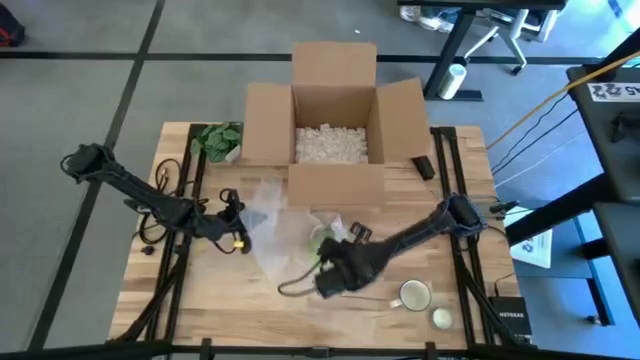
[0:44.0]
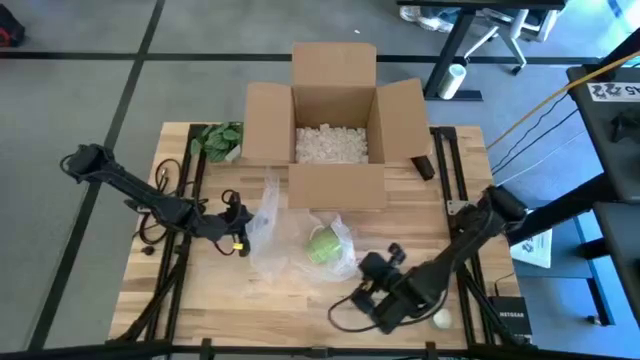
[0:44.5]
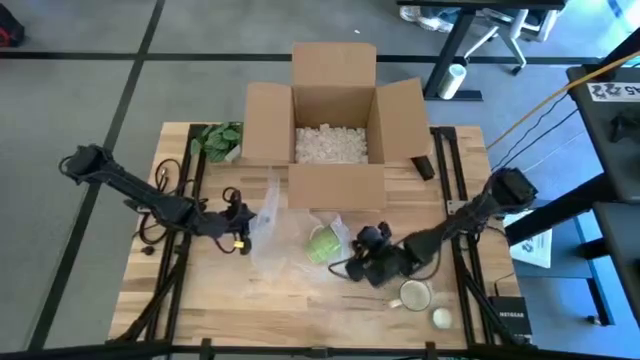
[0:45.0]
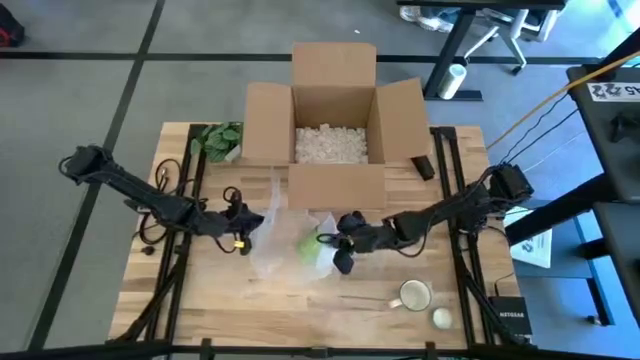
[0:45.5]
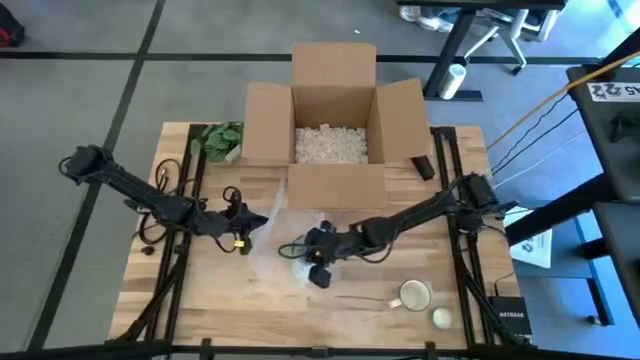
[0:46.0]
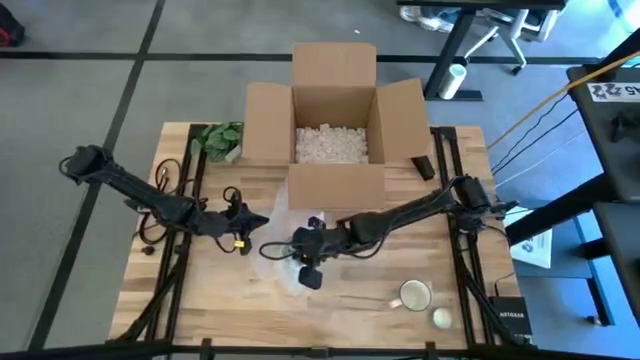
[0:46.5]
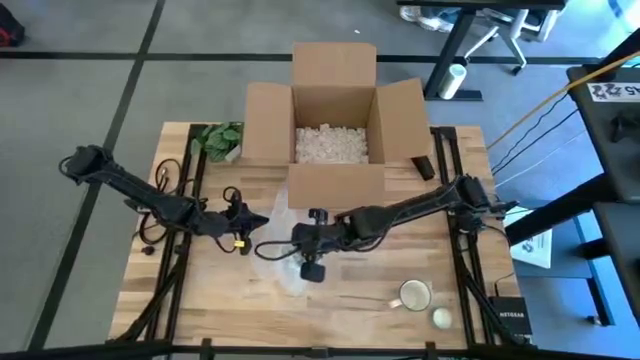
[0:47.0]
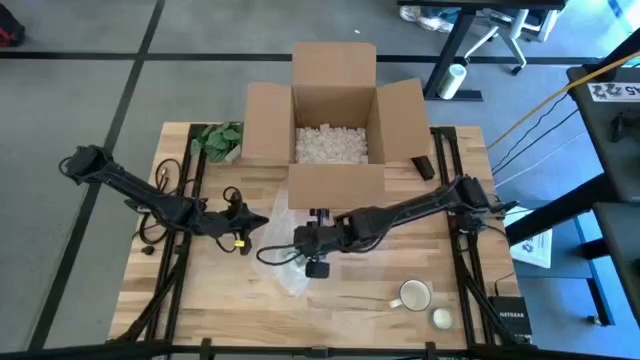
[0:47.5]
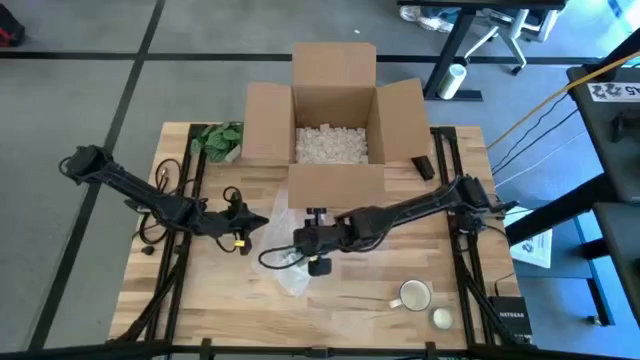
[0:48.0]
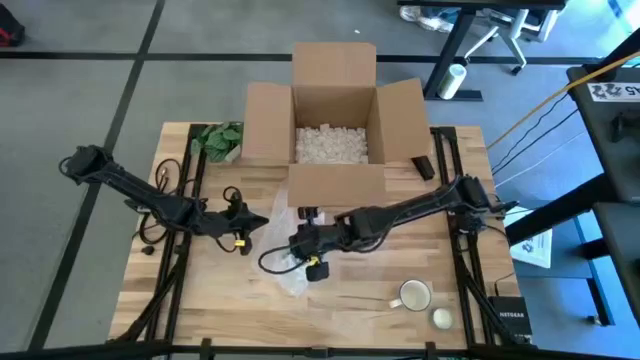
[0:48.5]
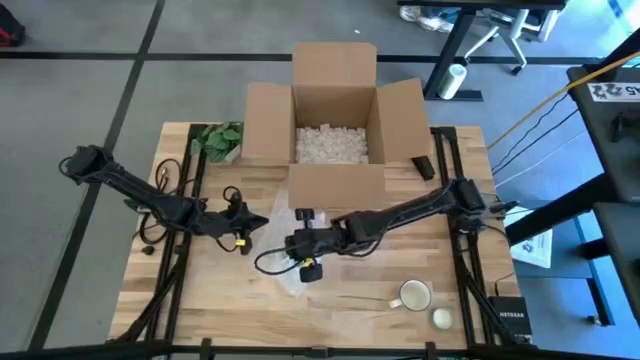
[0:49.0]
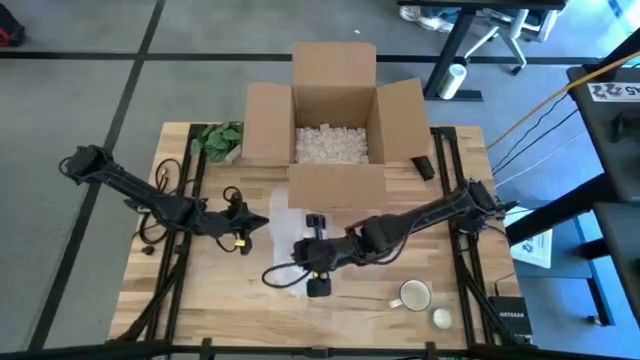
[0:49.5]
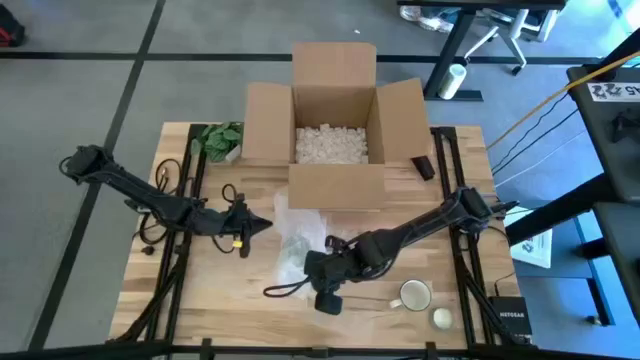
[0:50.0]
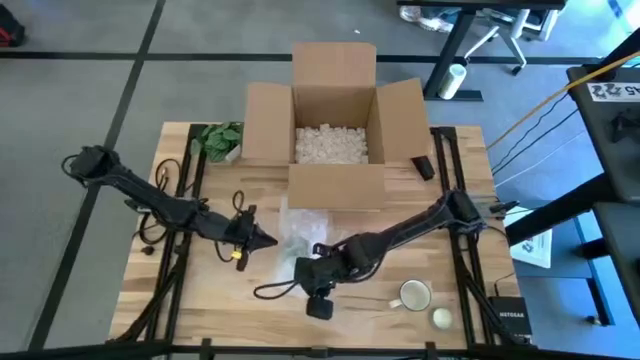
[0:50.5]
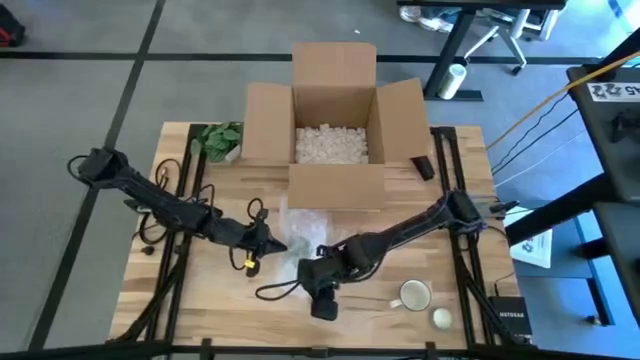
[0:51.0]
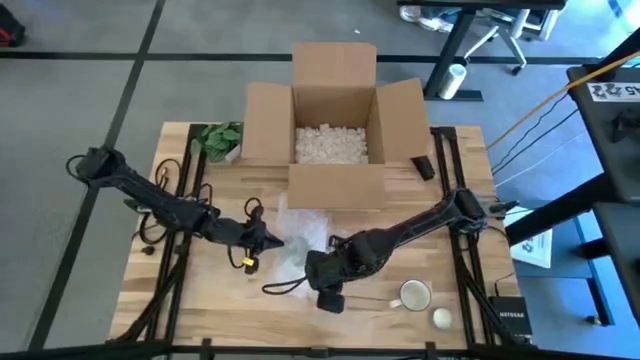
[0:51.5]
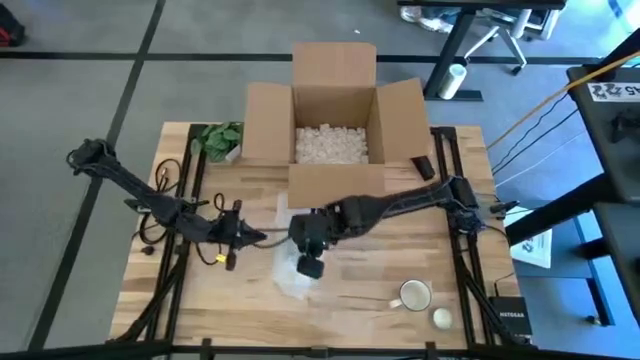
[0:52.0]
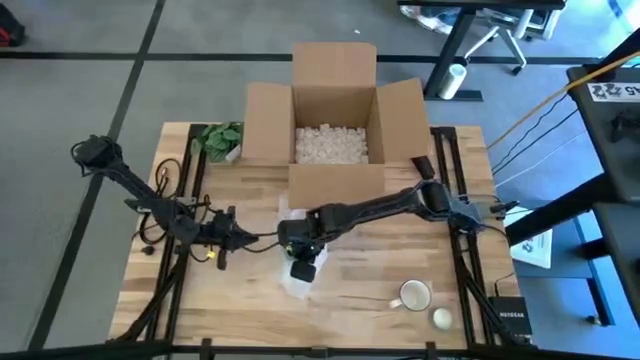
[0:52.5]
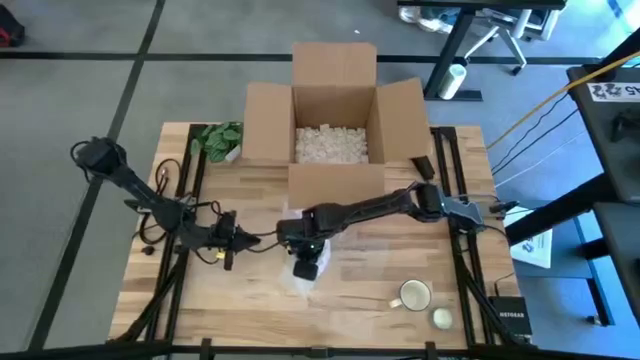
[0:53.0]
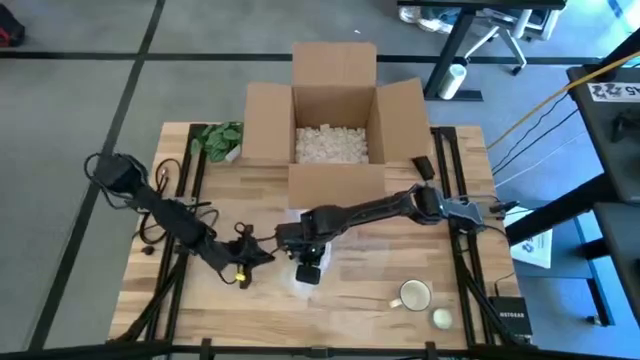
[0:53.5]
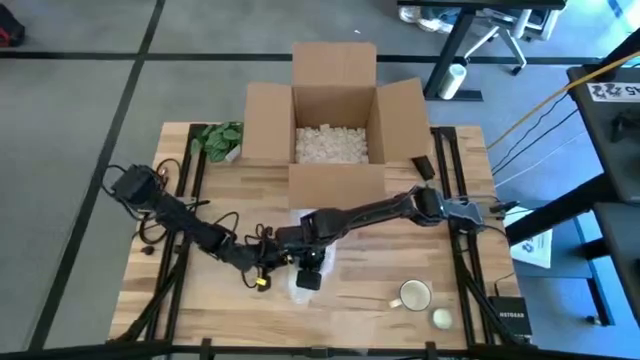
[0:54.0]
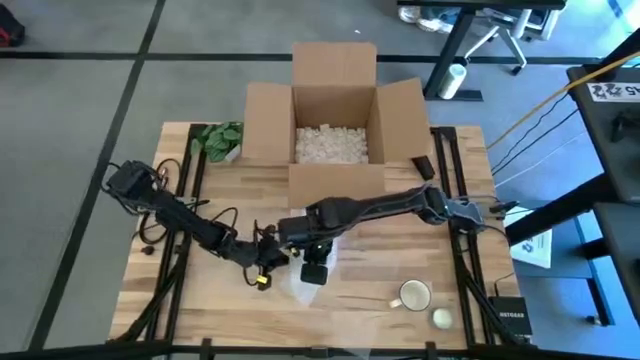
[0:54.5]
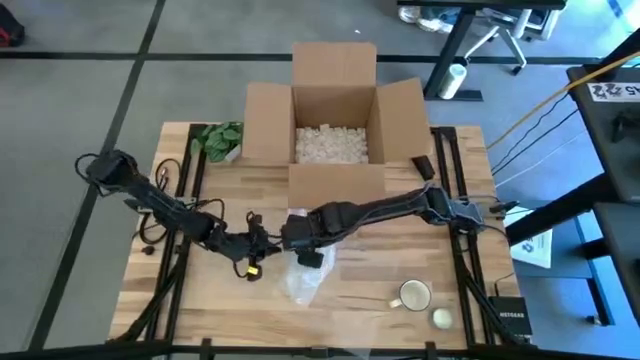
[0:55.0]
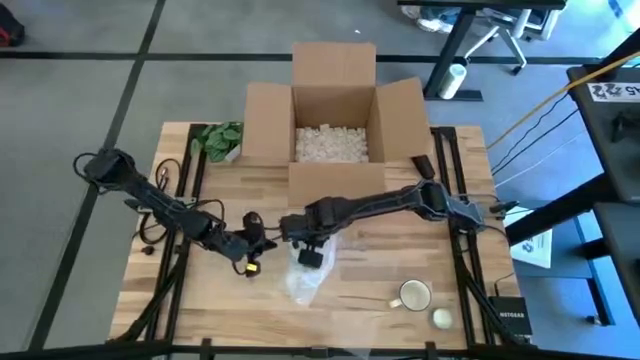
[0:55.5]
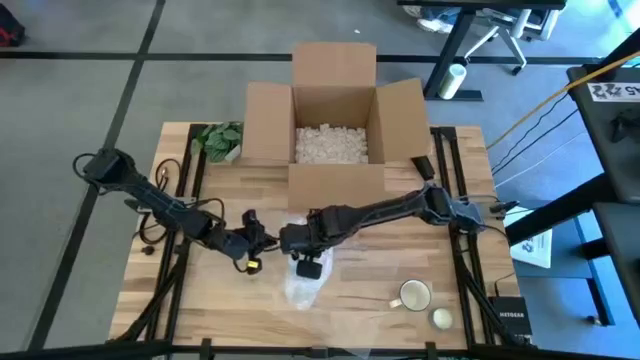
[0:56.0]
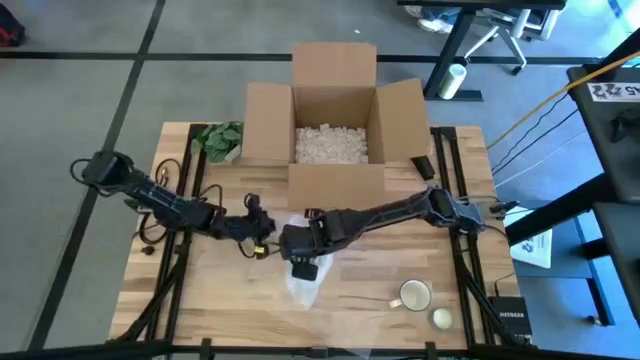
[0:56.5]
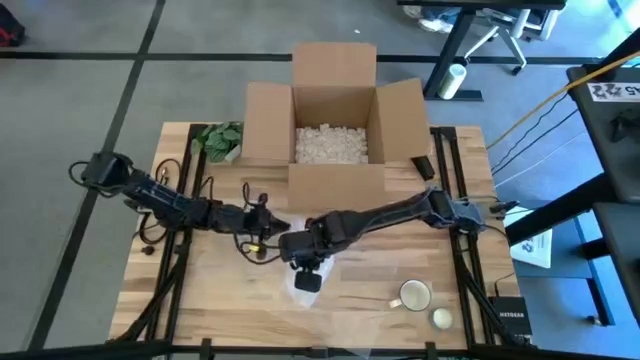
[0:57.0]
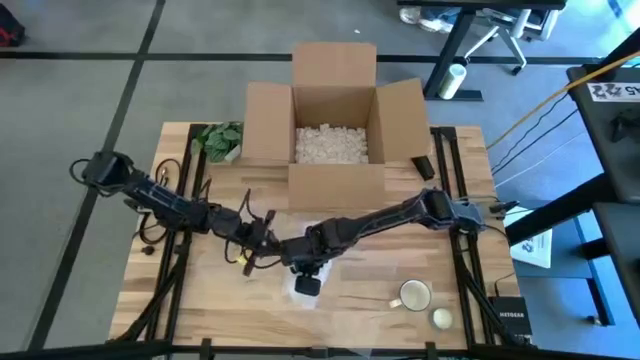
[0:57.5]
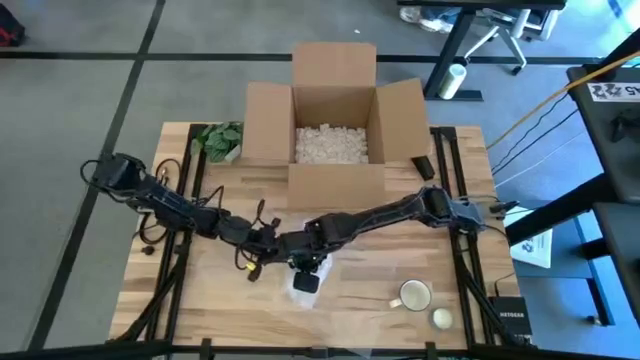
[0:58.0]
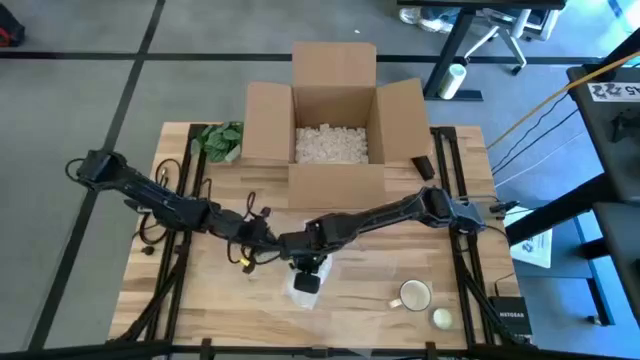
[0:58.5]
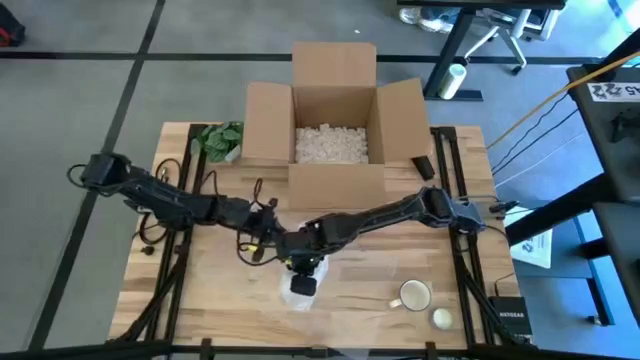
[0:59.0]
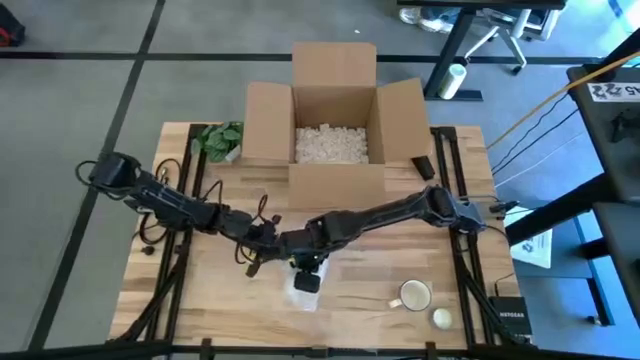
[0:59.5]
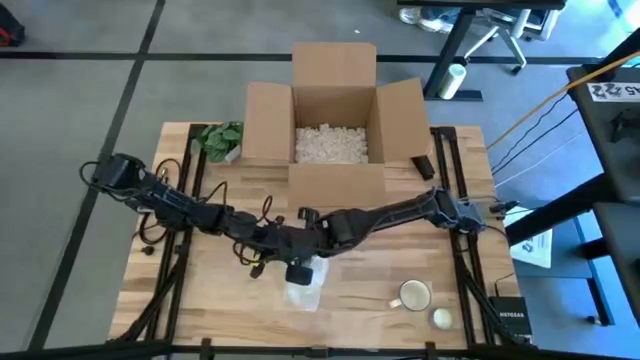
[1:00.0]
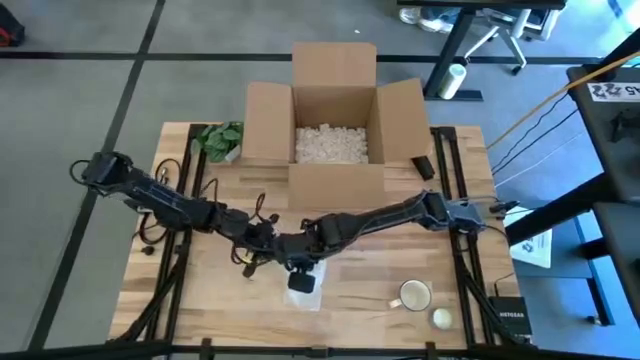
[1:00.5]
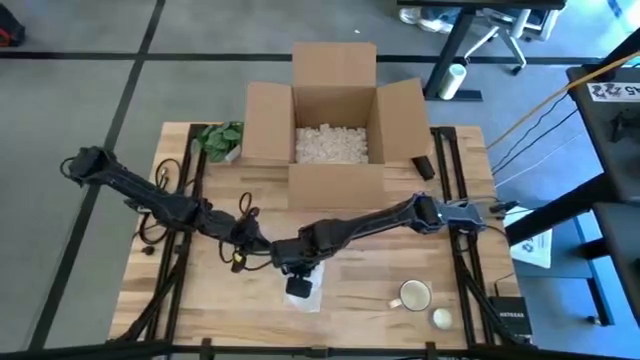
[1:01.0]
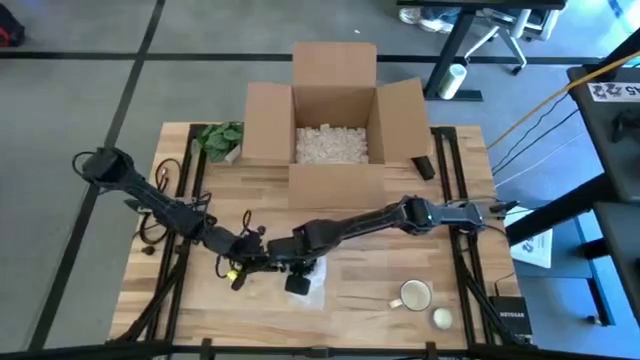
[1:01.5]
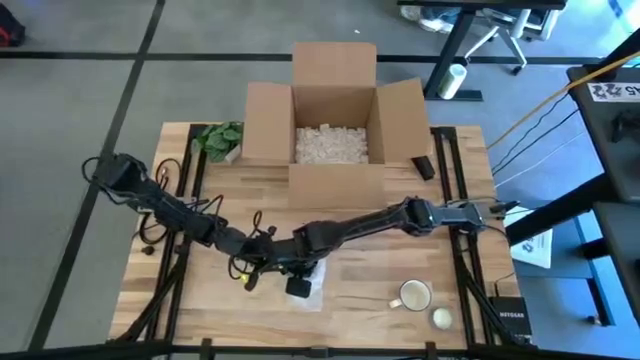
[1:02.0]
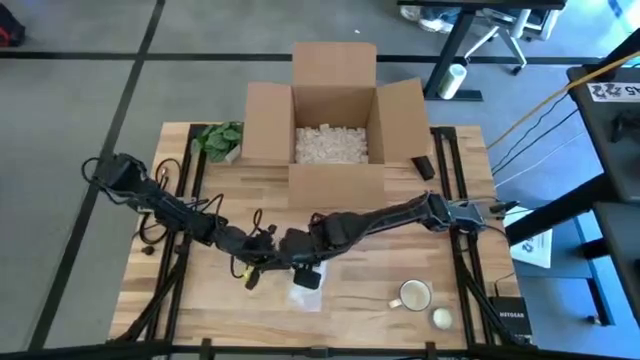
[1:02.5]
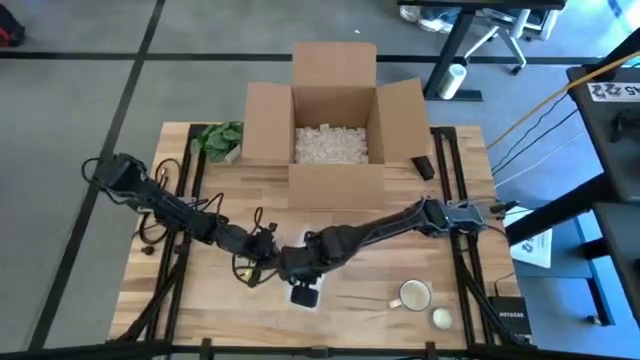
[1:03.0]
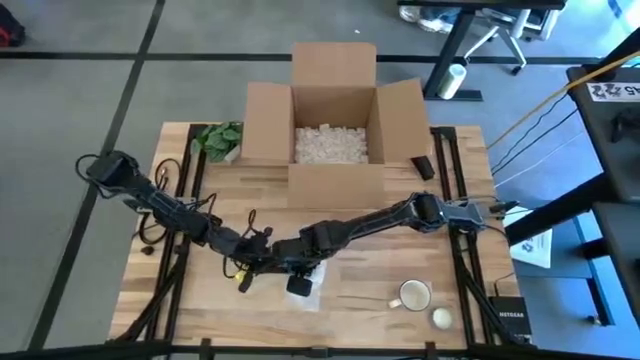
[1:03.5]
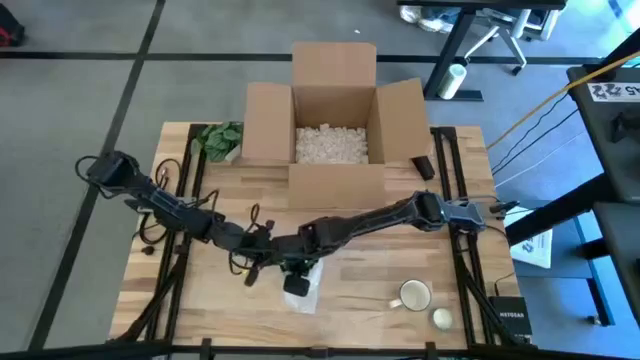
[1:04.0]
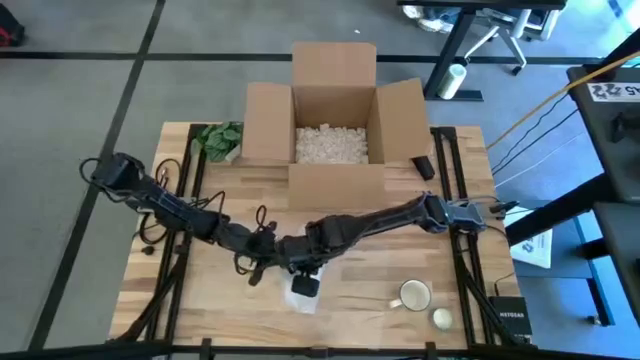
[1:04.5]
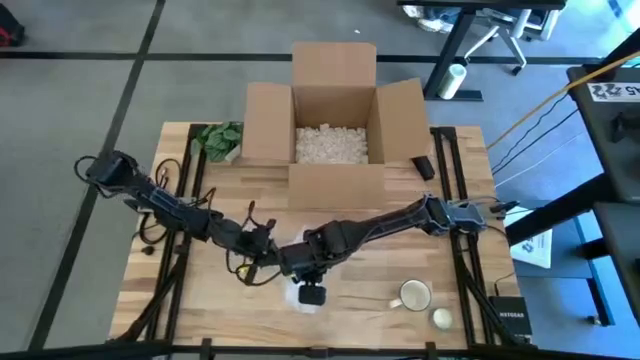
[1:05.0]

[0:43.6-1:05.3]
Task: wrap mug
Wrap the green mug with bubble wrap
